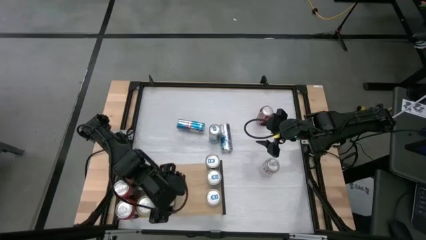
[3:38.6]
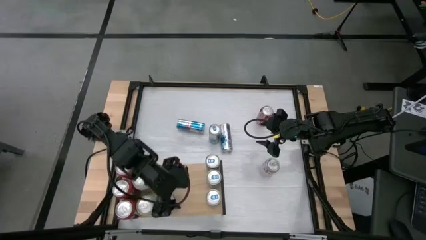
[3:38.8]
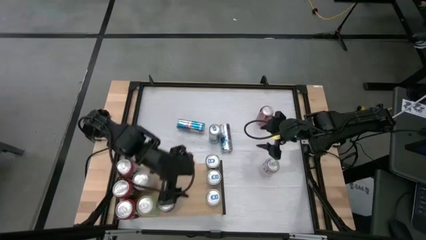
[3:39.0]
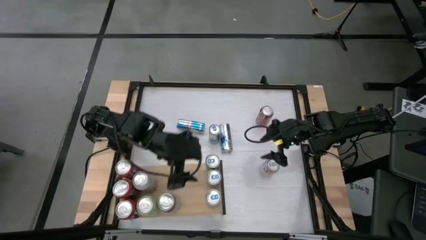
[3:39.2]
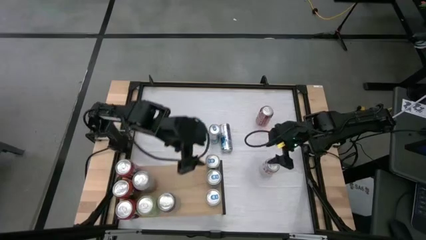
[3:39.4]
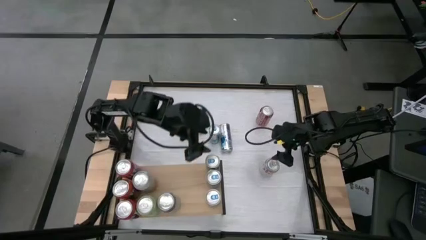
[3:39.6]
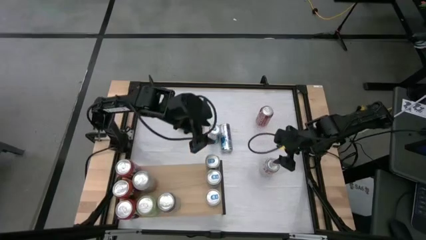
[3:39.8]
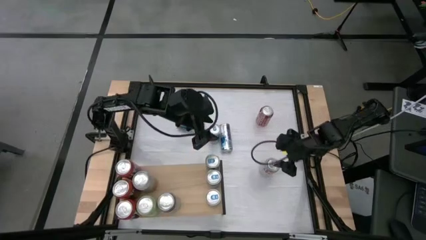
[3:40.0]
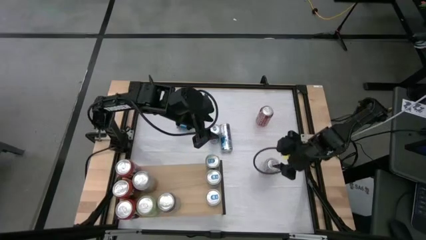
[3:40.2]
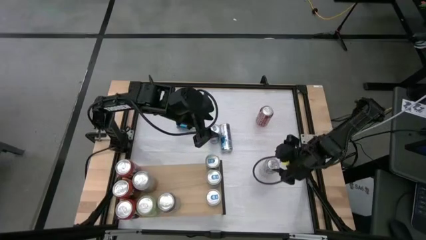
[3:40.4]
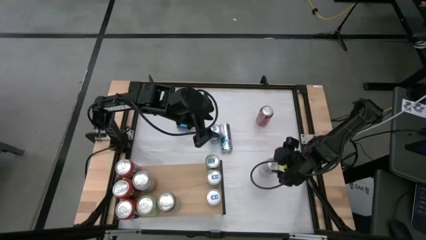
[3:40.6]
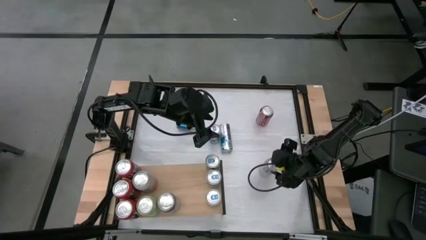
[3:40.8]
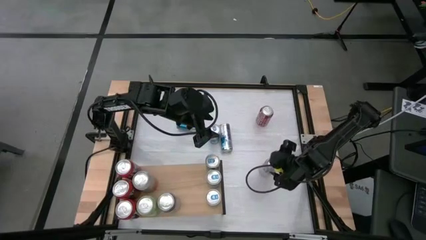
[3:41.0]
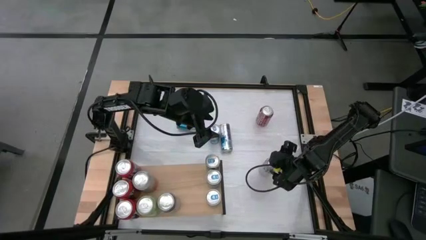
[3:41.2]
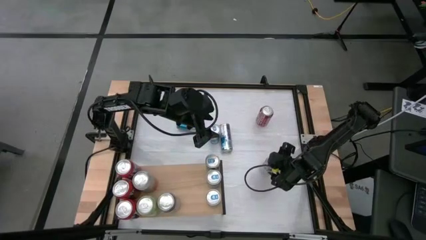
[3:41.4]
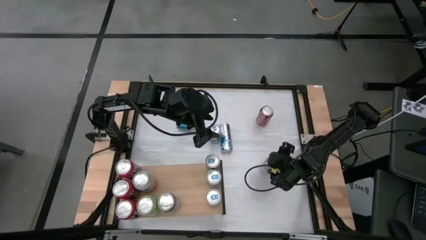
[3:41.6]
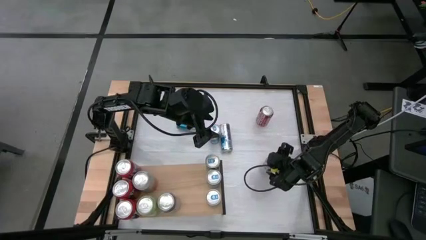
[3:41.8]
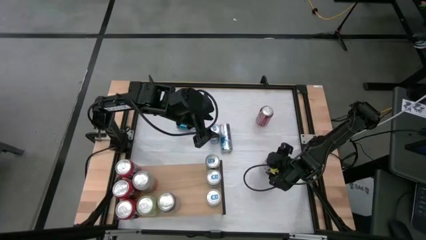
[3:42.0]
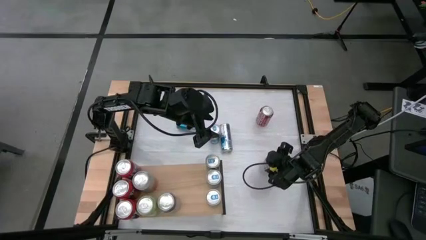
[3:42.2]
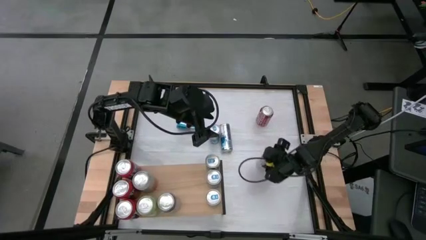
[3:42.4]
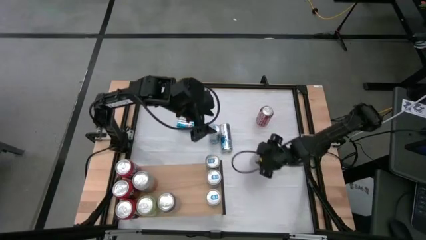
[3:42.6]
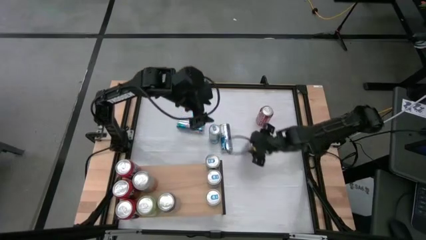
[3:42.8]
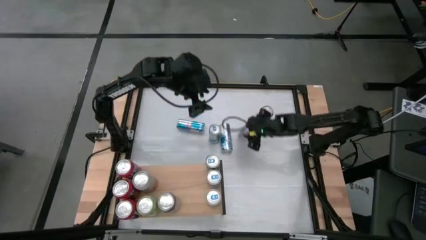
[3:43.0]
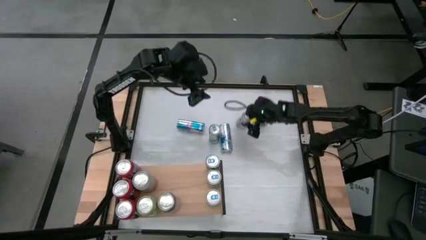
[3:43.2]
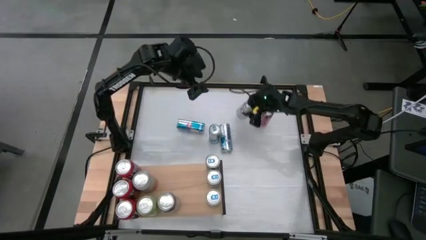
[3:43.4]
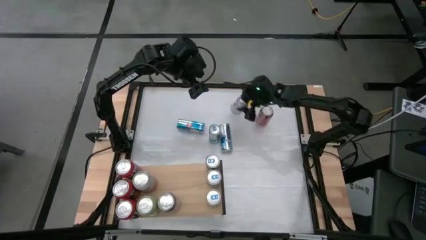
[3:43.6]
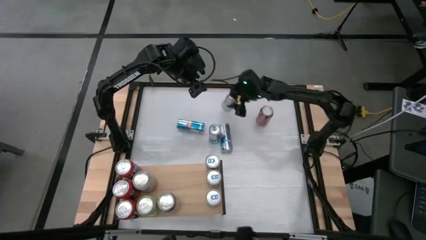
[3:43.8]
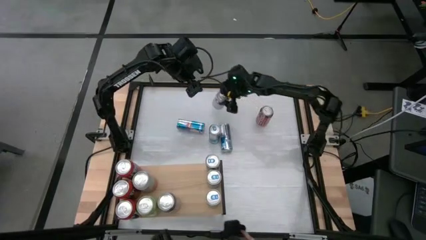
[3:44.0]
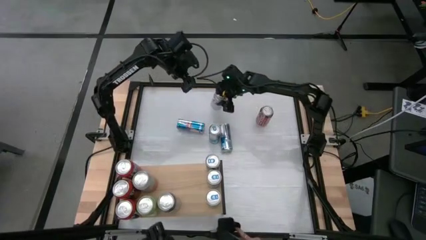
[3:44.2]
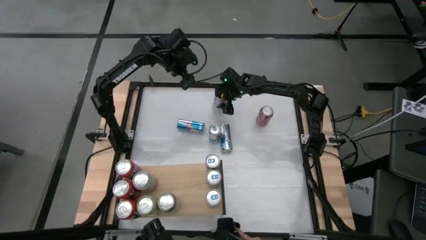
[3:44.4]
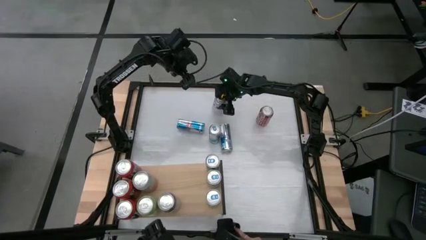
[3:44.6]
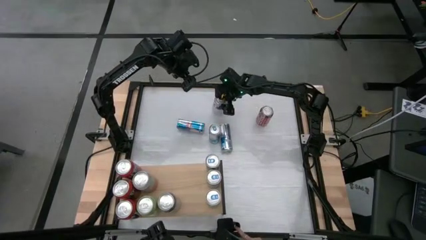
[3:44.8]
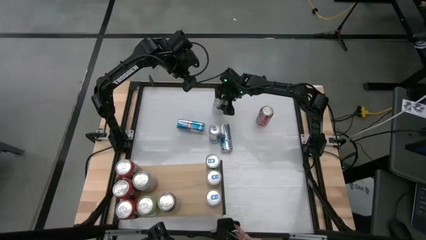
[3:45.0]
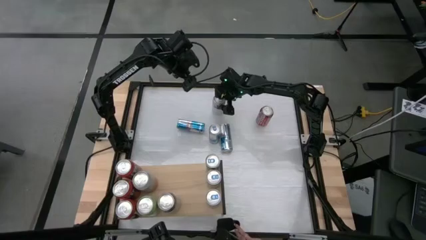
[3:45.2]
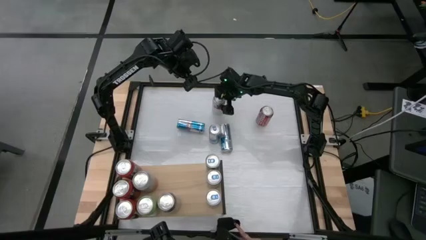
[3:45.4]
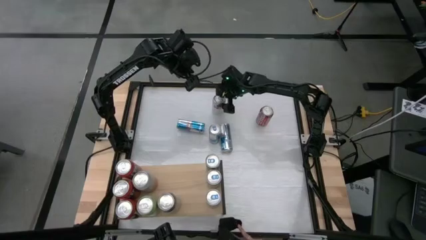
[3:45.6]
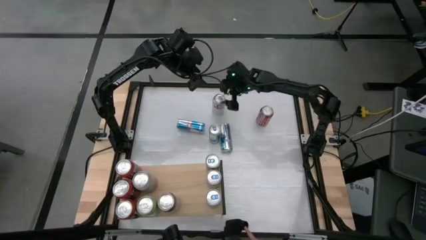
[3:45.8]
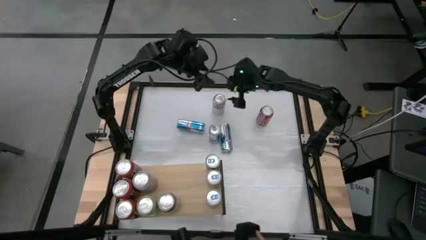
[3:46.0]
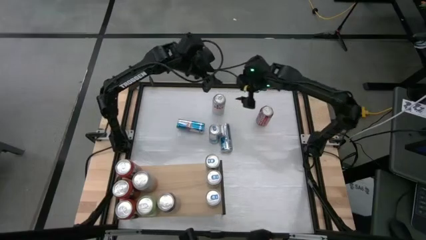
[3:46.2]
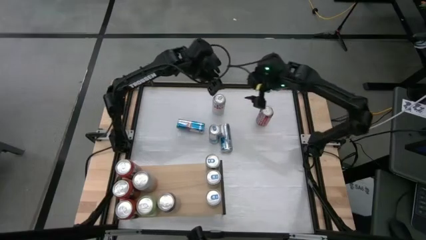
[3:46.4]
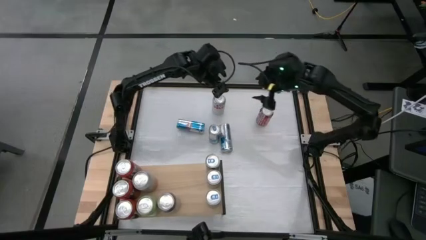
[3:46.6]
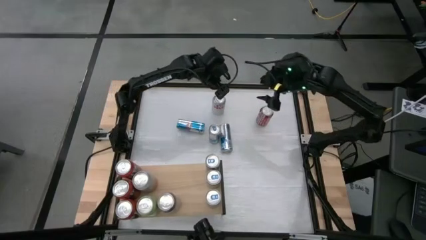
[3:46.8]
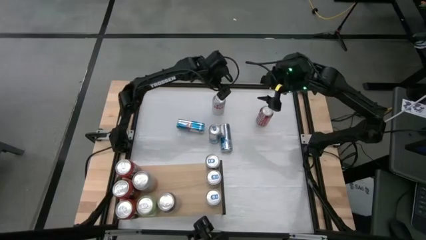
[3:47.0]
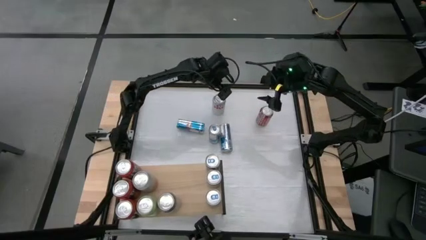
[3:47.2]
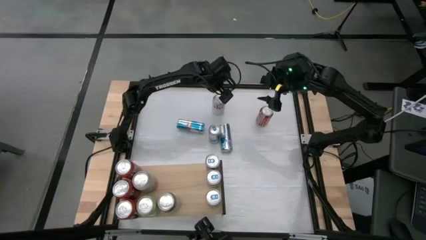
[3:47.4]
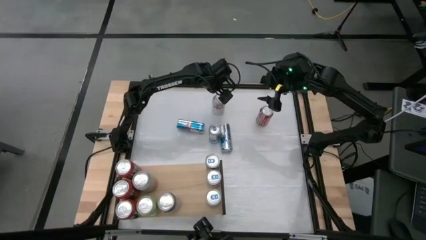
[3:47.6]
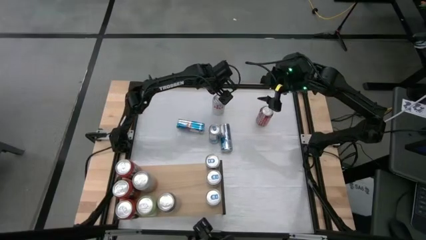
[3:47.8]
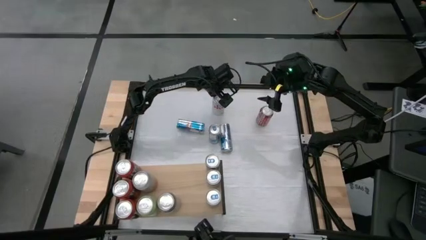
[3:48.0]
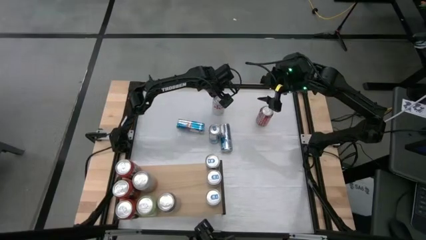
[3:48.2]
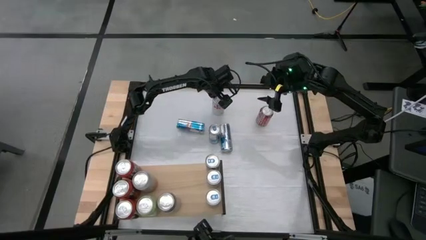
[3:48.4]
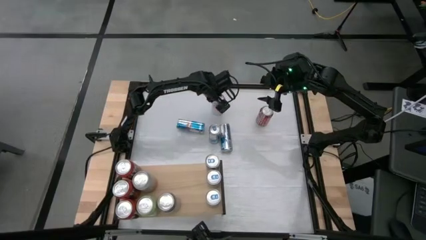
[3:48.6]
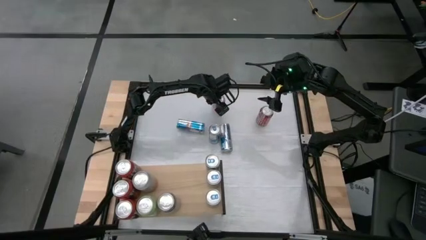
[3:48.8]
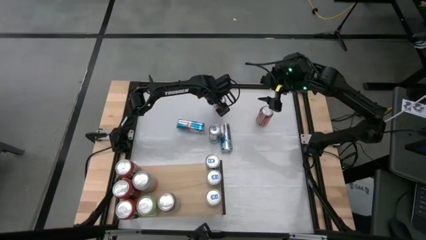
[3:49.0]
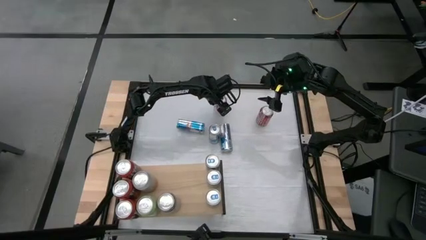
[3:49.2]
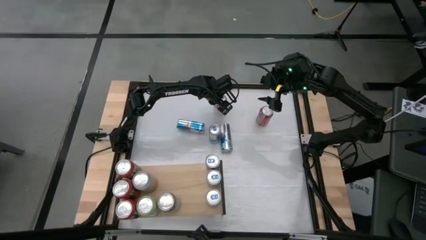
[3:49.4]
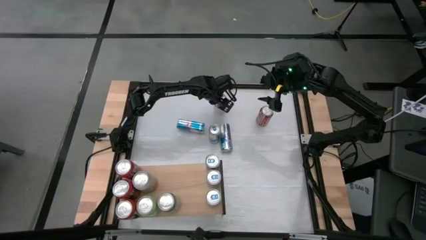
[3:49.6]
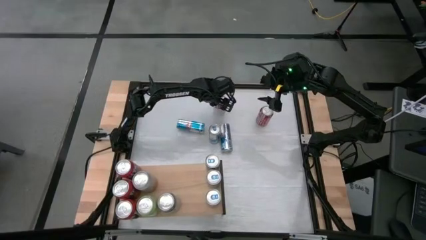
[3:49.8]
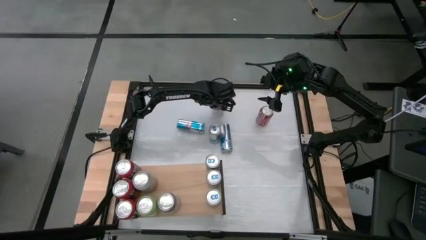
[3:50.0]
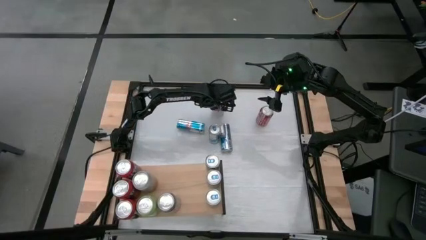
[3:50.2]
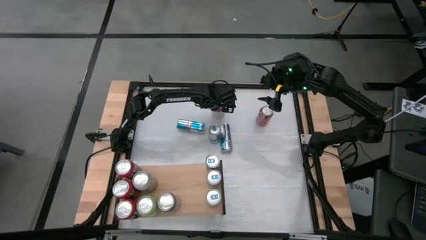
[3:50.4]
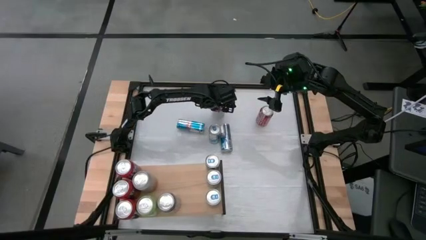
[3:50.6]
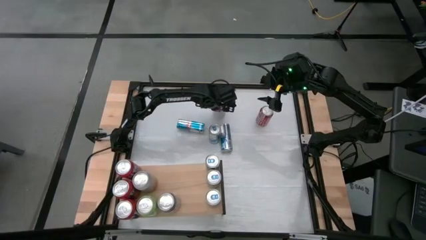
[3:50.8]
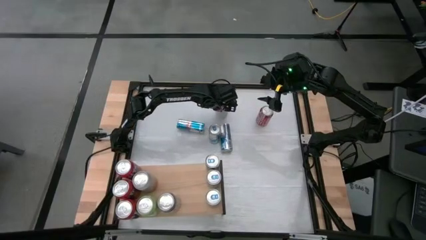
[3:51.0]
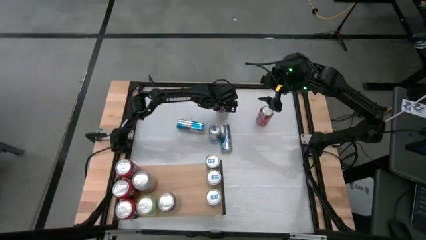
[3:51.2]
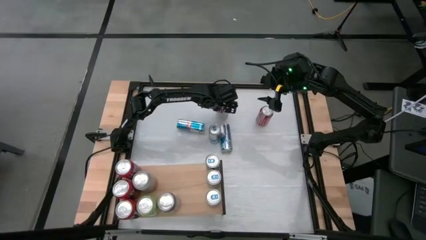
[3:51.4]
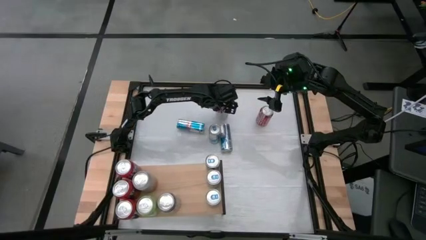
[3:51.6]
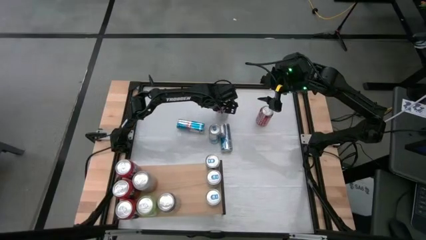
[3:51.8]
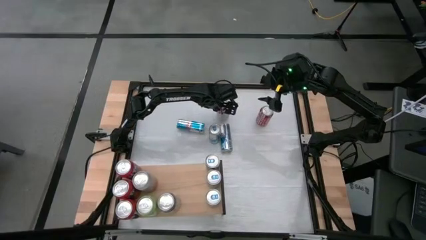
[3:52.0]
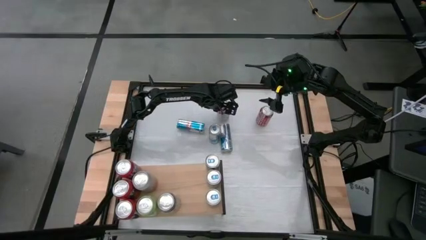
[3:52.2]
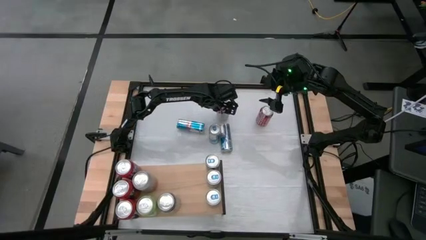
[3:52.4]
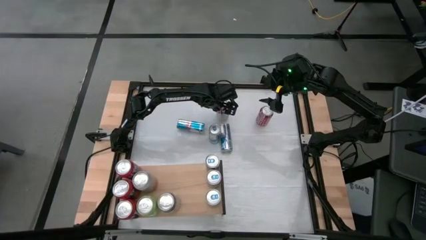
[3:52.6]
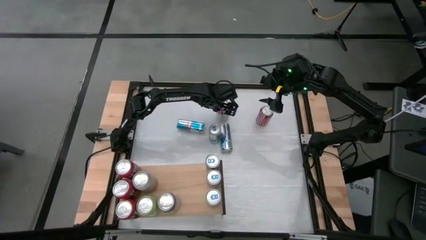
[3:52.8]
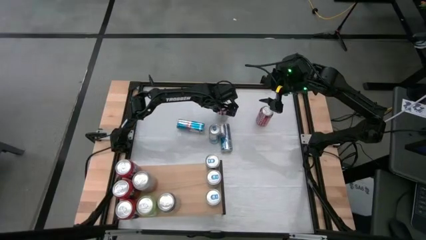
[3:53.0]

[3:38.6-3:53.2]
Task: Place canned beverage on shelf
Put the silver soda can on the shelf aligned with the silver soda can

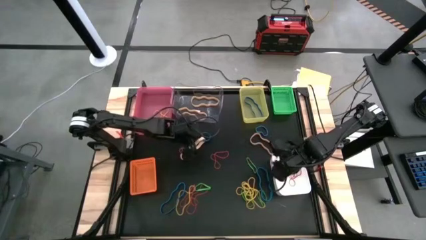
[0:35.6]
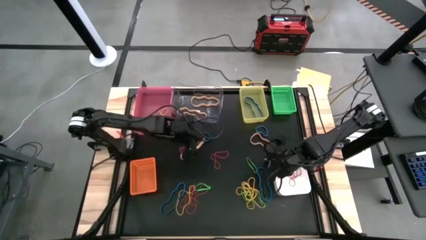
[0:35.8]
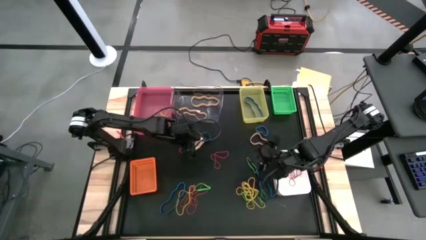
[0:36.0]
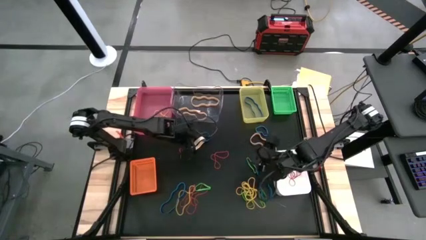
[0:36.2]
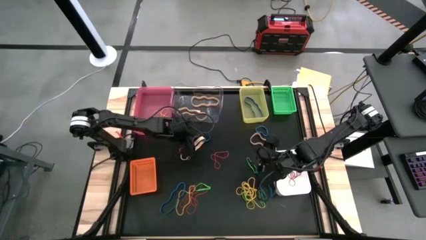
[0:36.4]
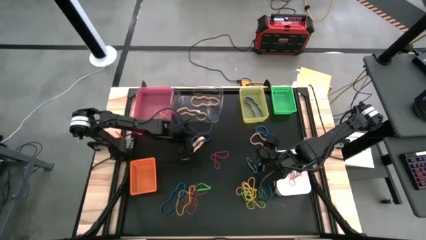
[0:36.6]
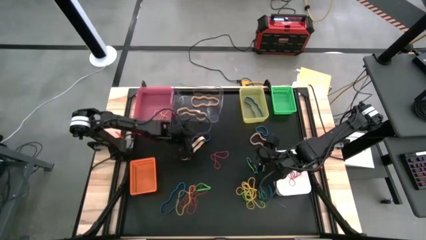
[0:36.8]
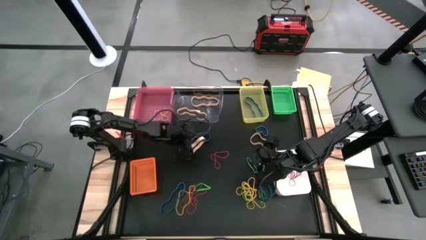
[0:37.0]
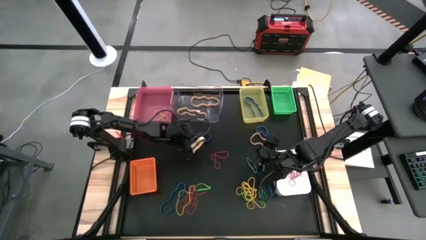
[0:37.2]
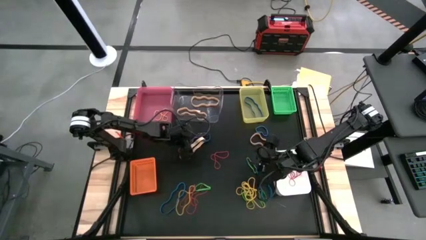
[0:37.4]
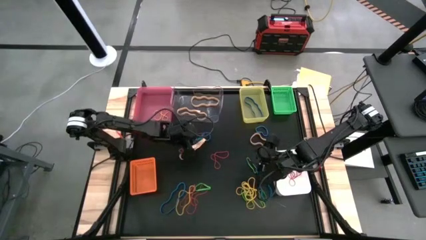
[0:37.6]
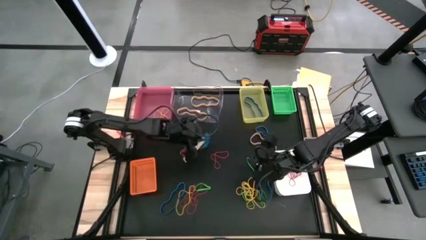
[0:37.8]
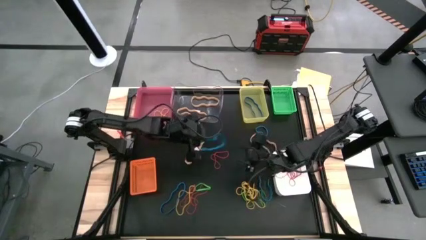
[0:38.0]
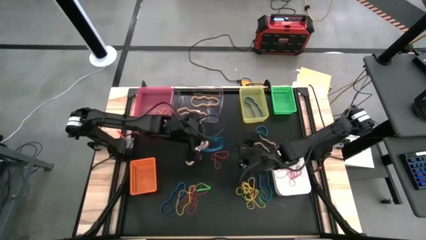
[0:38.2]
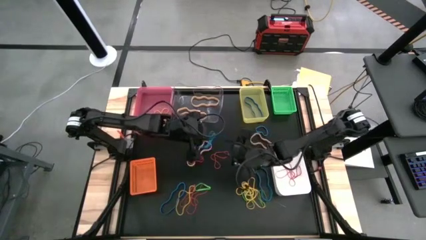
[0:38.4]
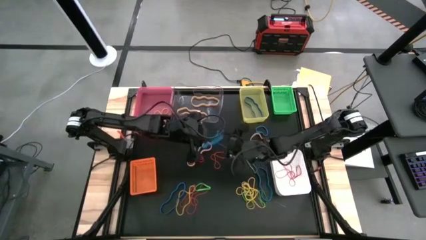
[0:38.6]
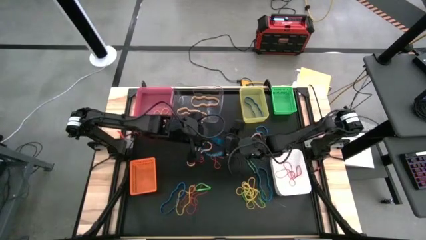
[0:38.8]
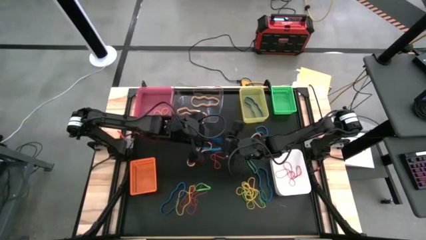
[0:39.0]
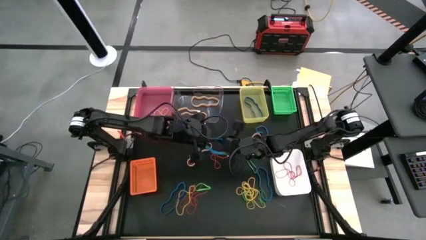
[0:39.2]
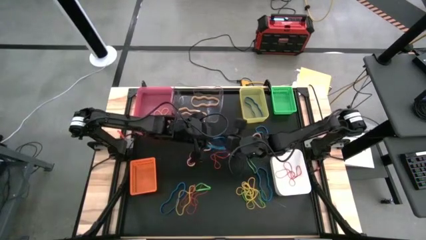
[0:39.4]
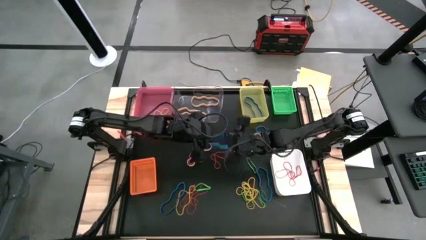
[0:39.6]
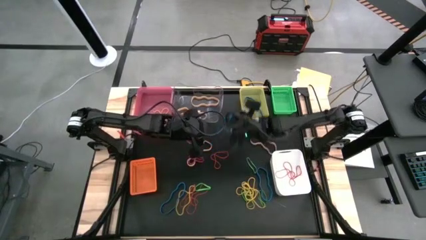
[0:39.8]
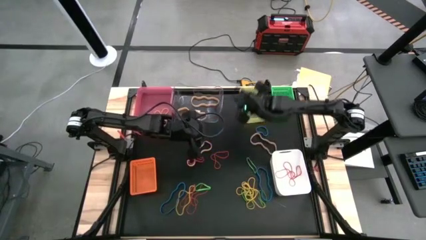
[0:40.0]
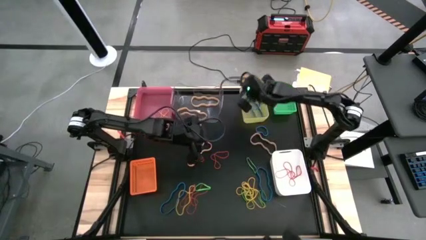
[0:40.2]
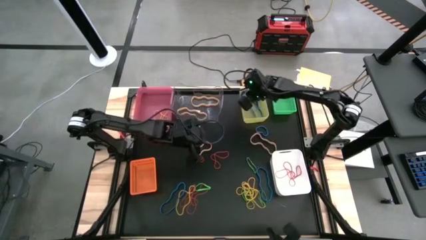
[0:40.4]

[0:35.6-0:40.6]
Task: Sort rubber bands into baskets
Put the blue rubber band into the yellow bin
